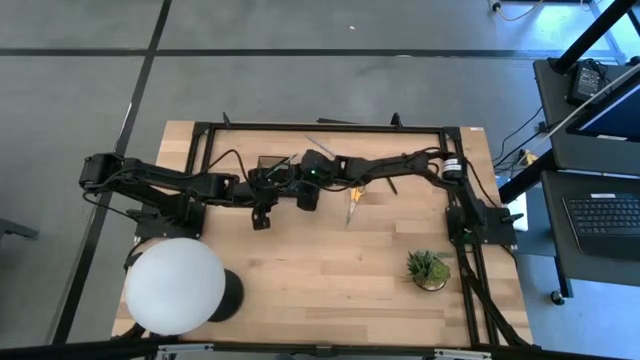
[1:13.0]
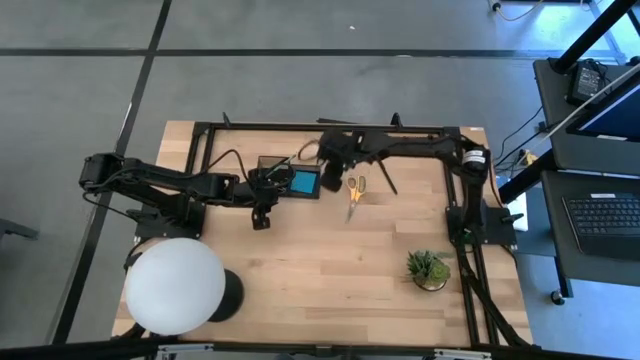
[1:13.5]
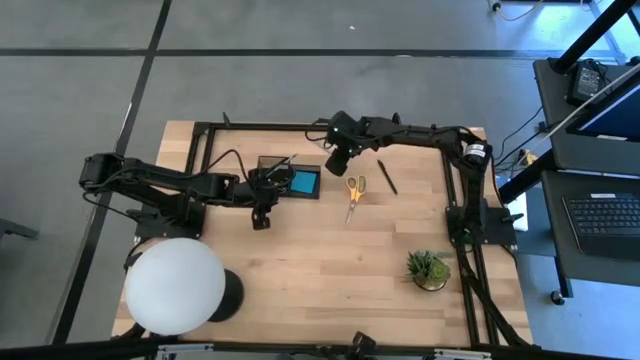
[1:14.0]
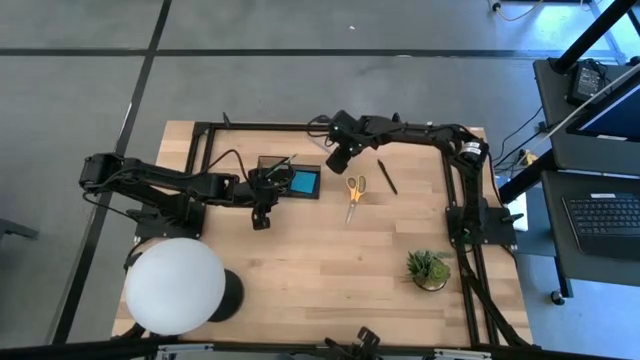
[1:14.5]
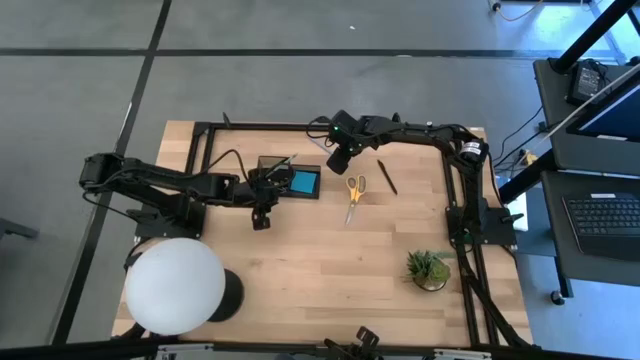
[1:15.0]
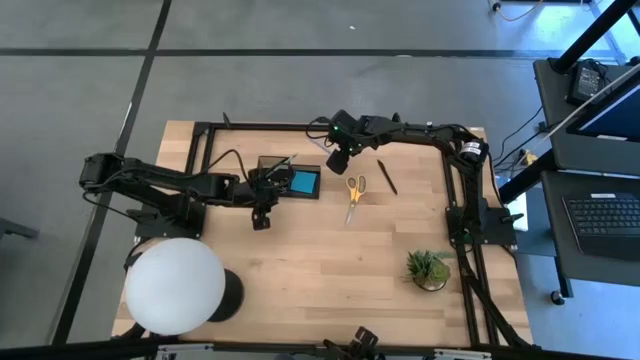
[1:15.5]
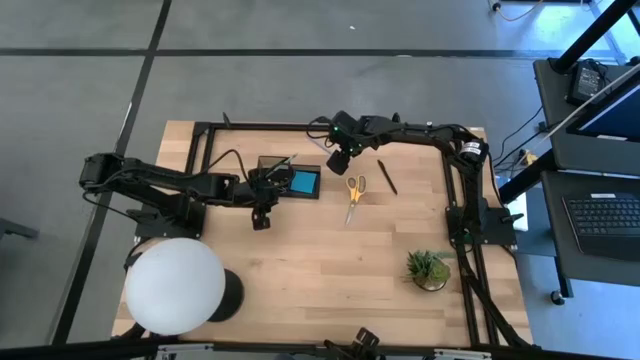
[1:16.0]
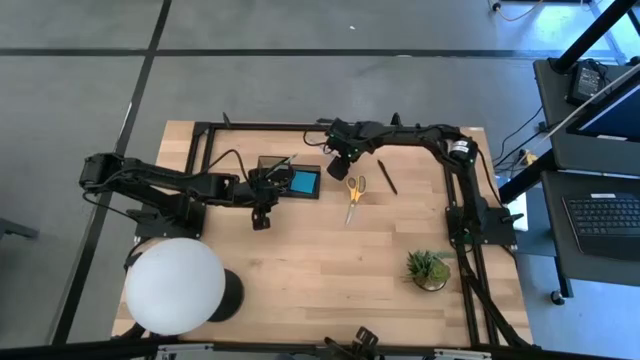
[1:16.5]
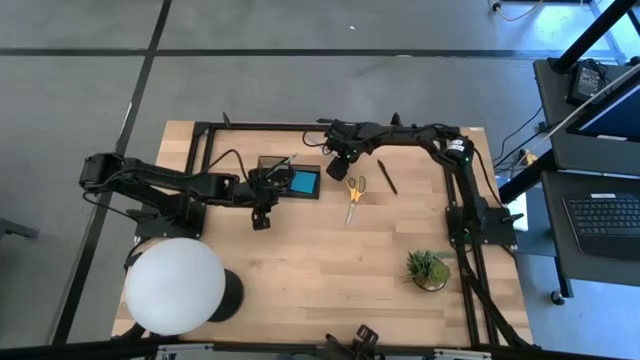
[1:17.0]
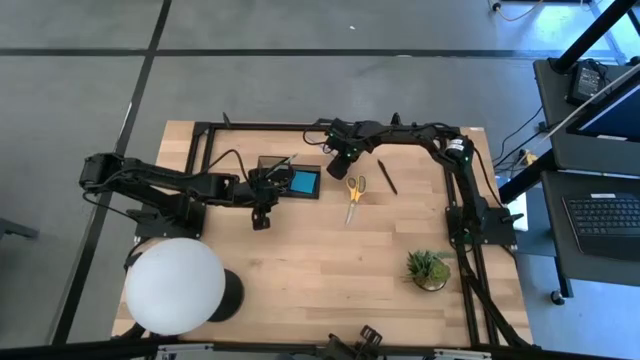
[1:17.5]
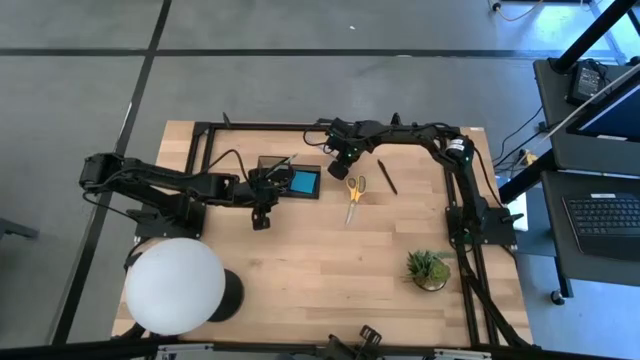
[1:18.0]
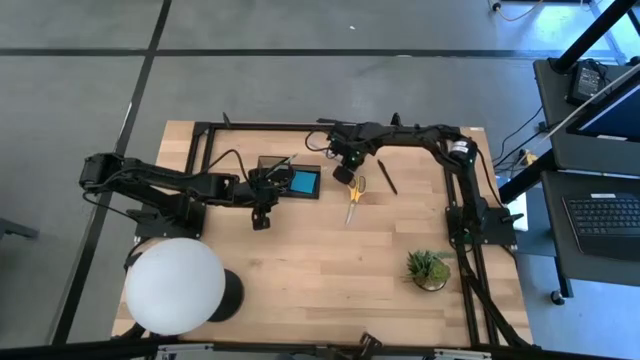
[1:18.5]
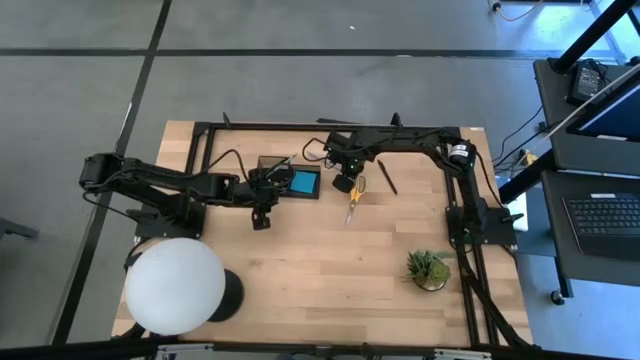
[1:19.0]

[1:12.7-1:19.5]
Task: Pick and place office supplies into organizer
Put the blue pencil into the black desk organizer

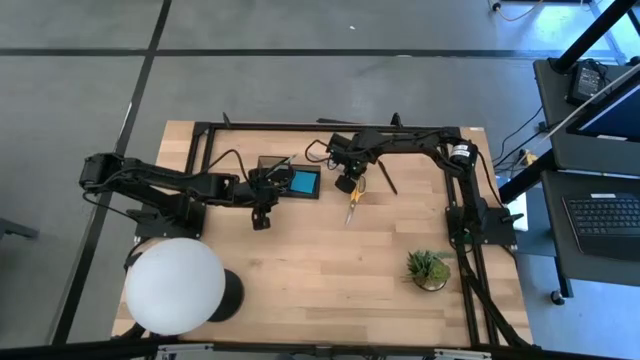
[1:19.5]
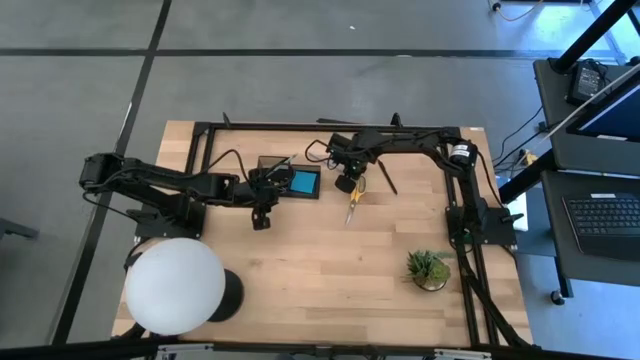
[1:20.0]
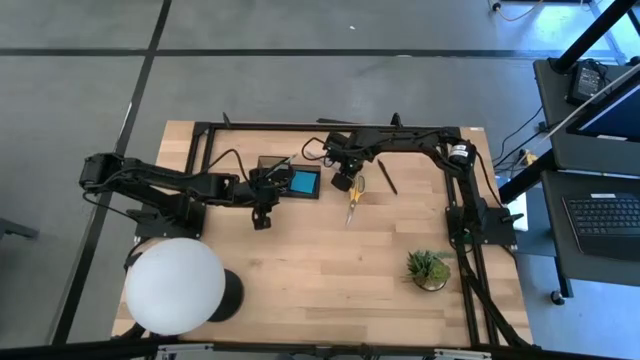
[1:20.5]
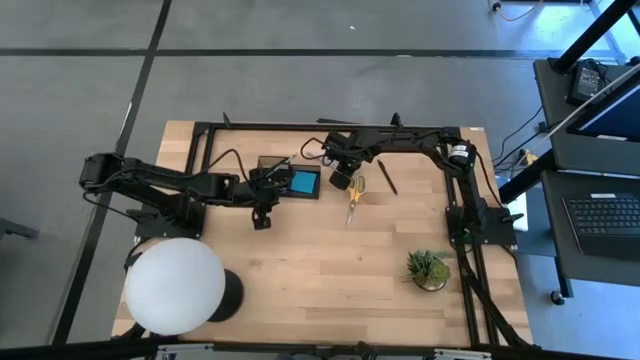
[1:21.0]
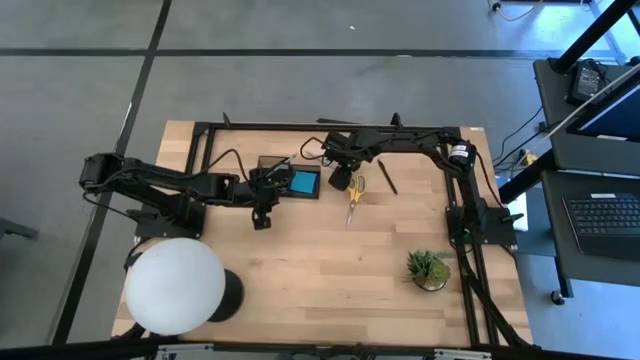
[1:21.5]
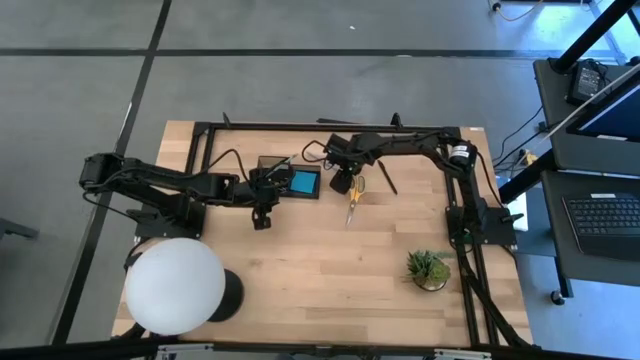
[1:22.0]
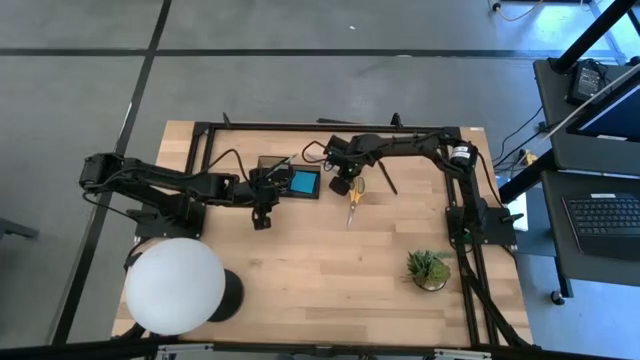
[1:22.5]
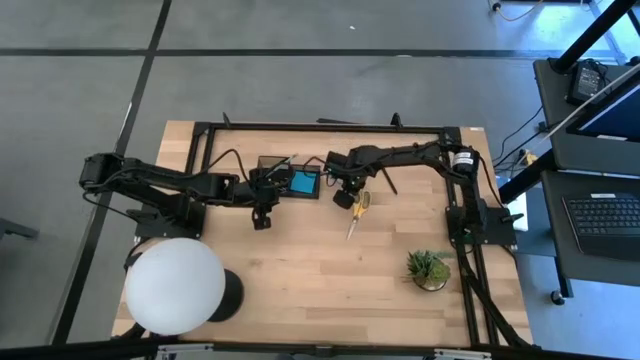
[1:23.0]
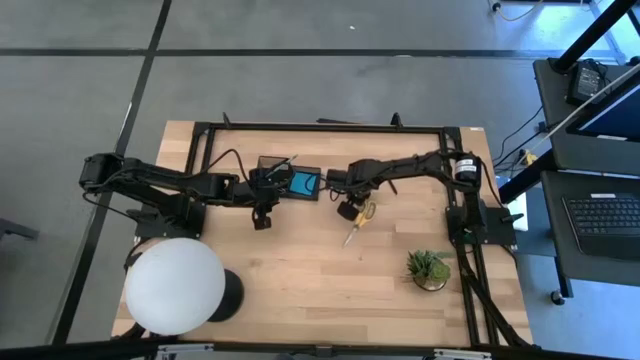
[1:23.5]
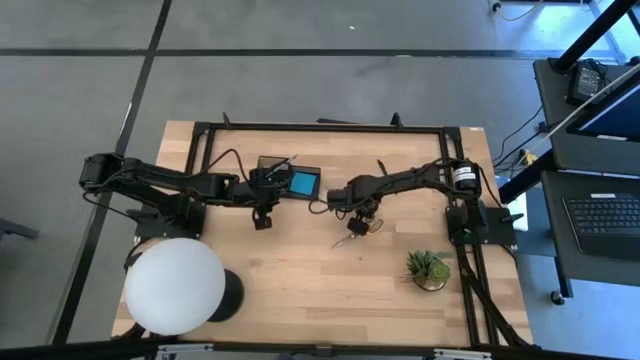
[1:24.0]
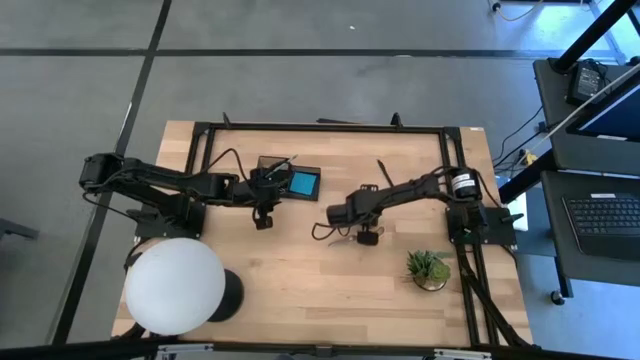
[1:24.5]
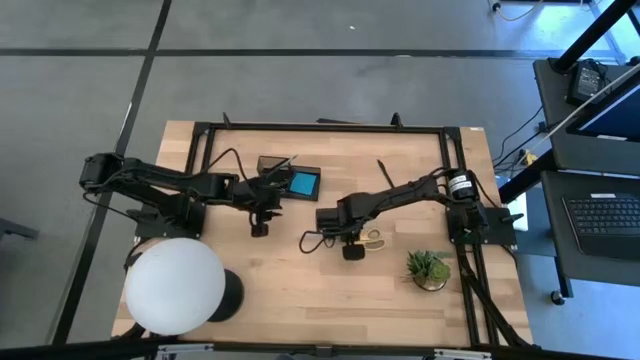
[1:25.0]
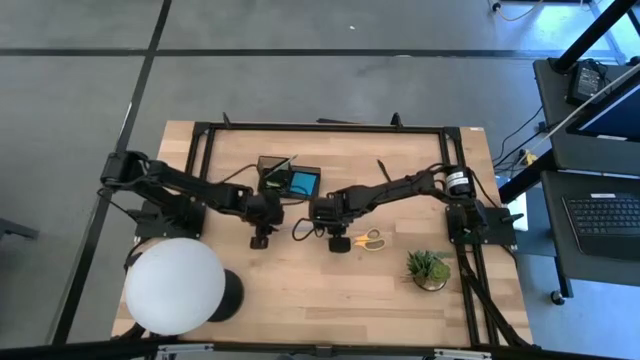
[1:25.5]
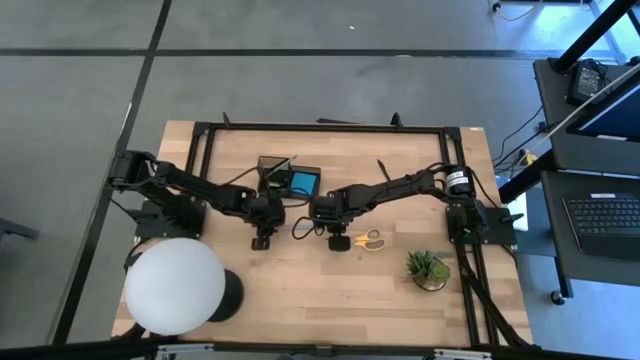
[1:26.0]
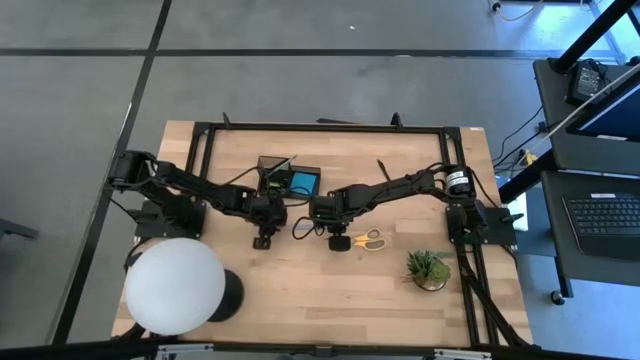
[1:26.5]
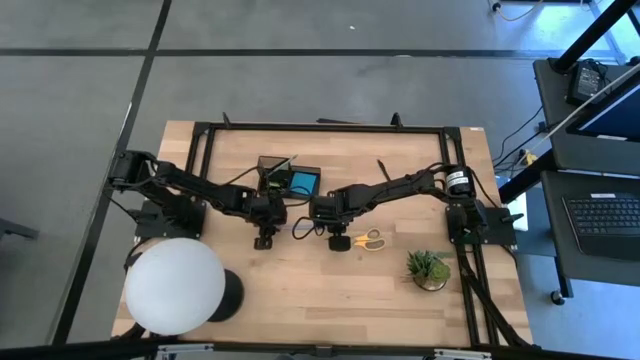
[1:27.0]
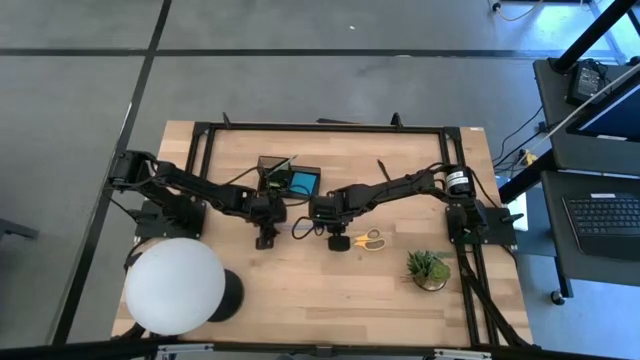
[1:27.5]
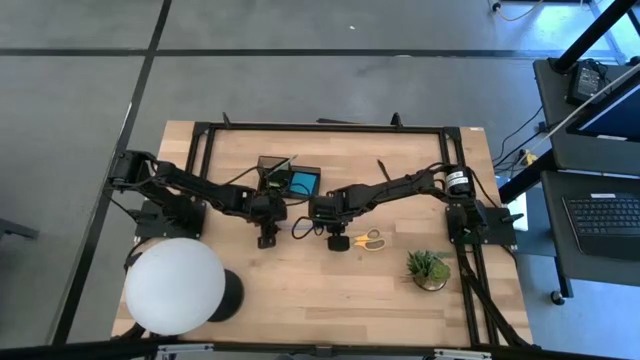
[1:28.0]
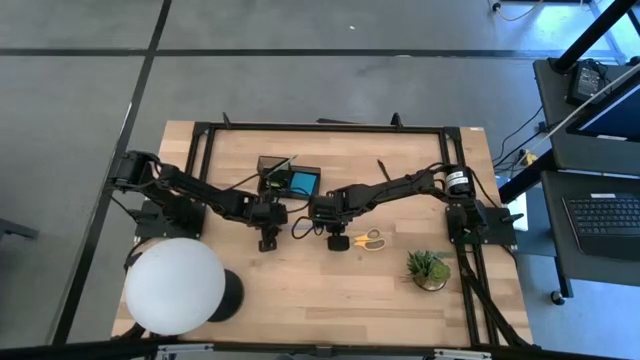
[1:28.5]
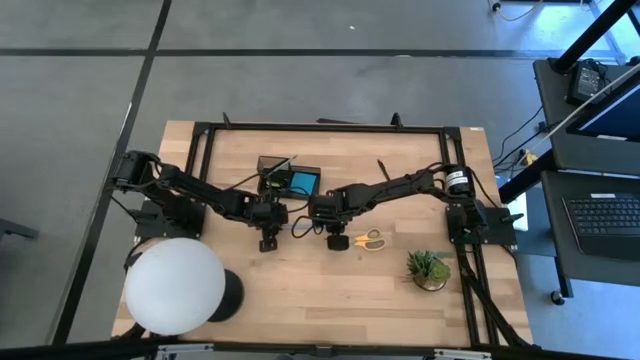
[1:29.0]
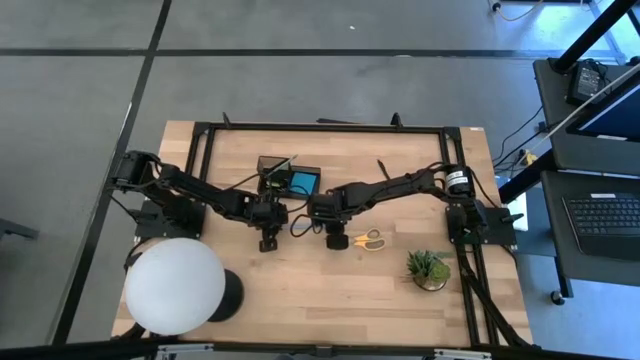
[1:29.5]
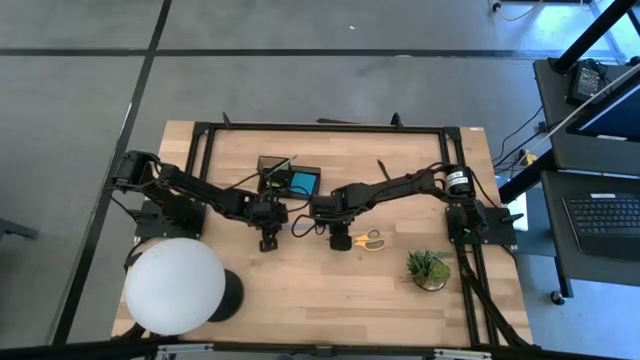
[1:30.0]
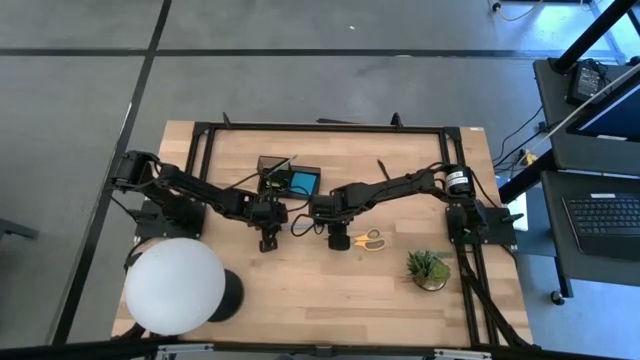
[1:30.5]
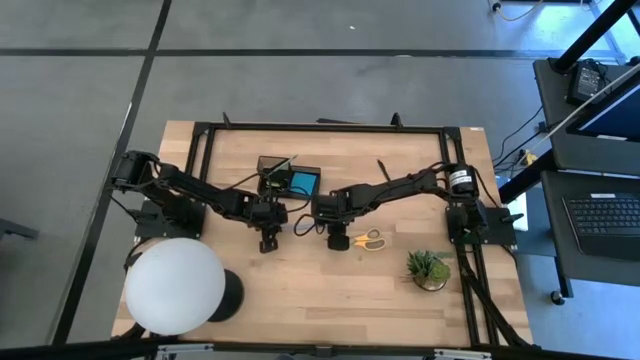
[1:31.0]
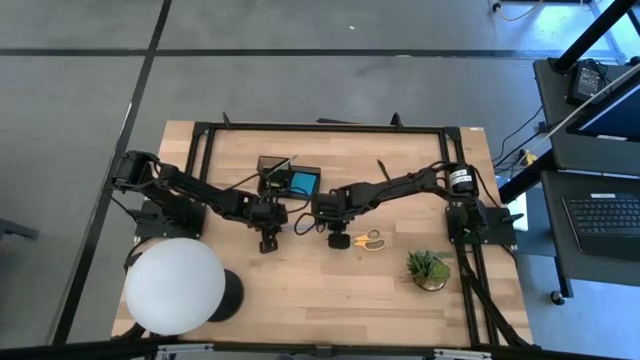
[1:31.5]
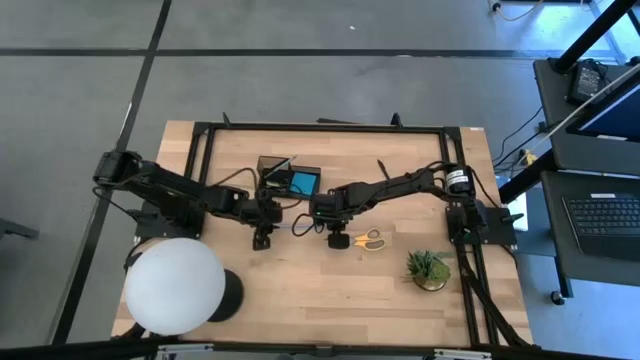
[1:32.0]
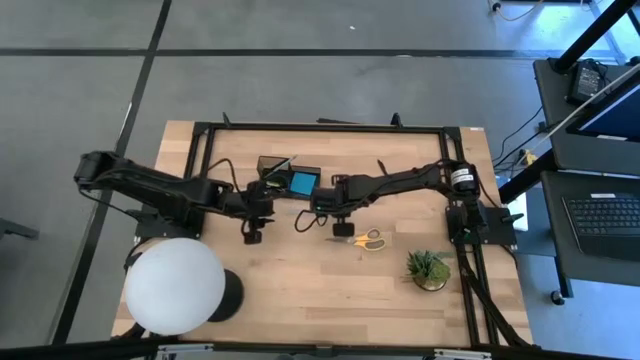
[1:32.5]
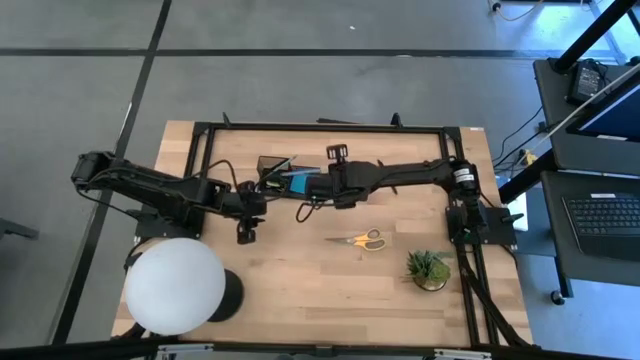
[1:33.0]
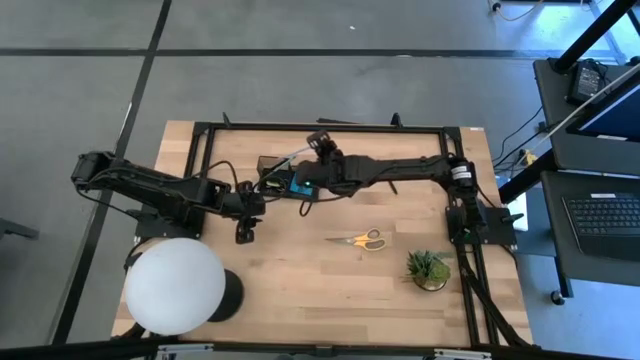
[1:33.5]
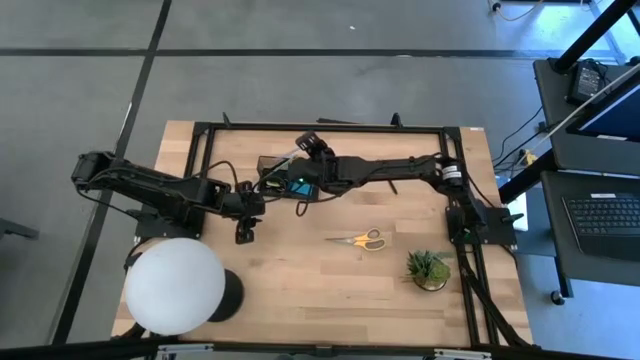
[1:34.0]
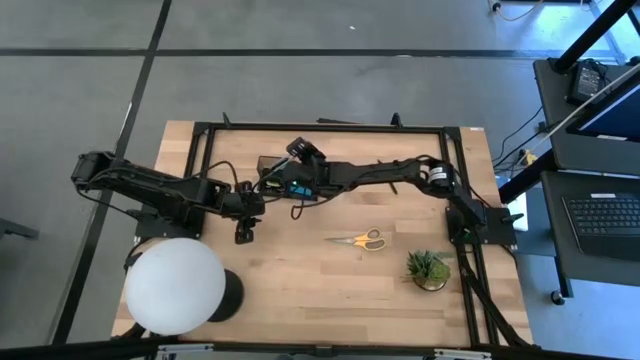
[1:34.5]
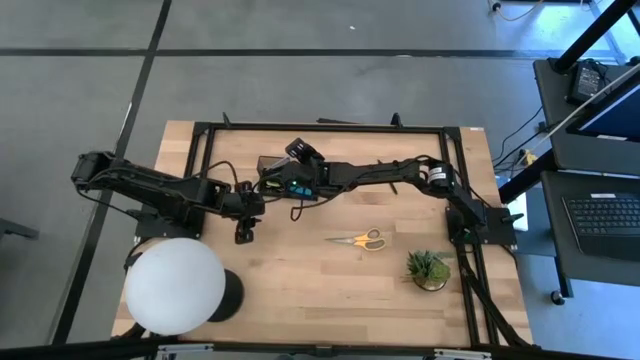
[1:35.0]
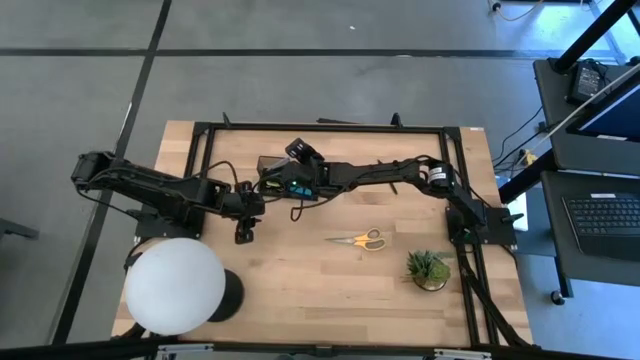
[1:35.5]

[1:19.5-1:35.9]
Put the blue pencil into the black desk organizer
